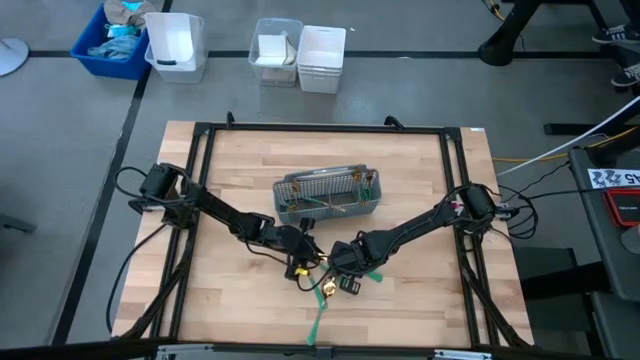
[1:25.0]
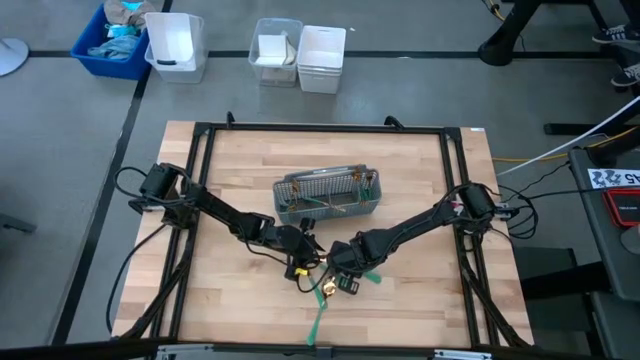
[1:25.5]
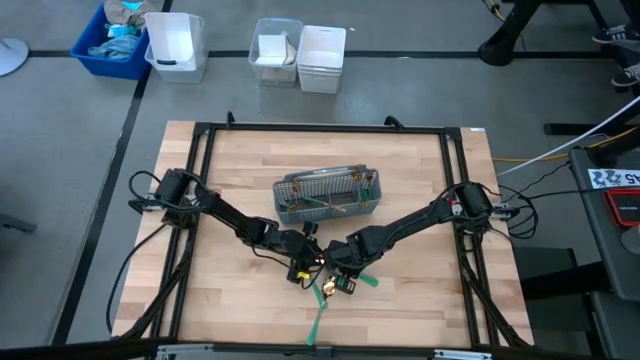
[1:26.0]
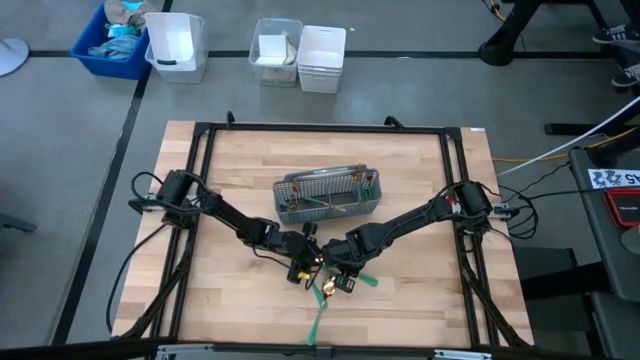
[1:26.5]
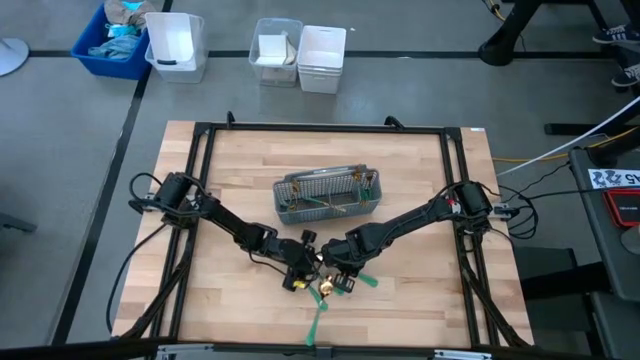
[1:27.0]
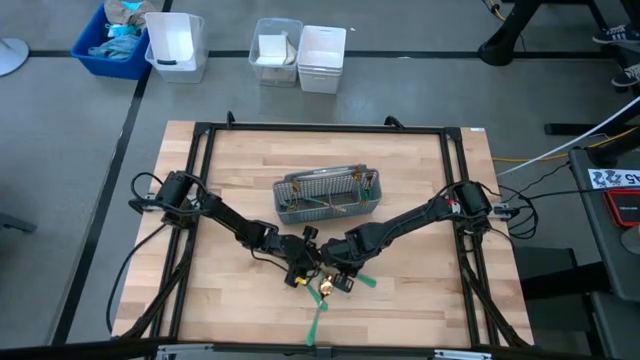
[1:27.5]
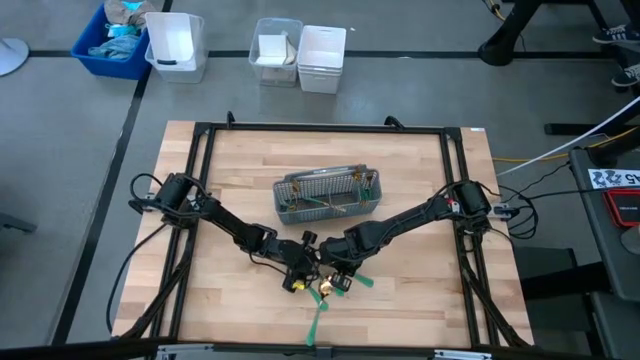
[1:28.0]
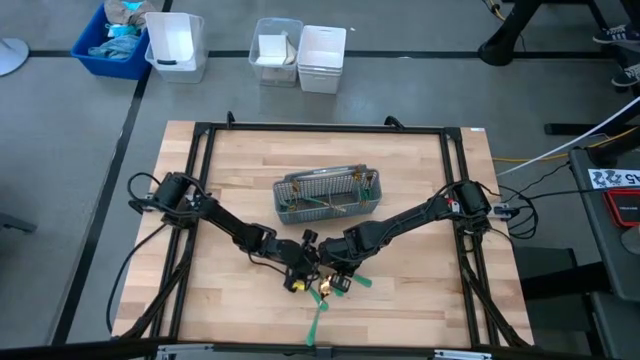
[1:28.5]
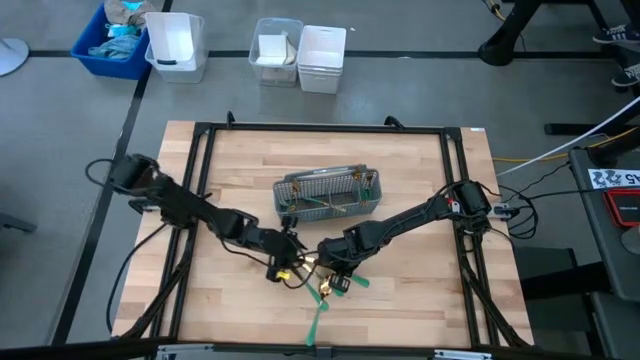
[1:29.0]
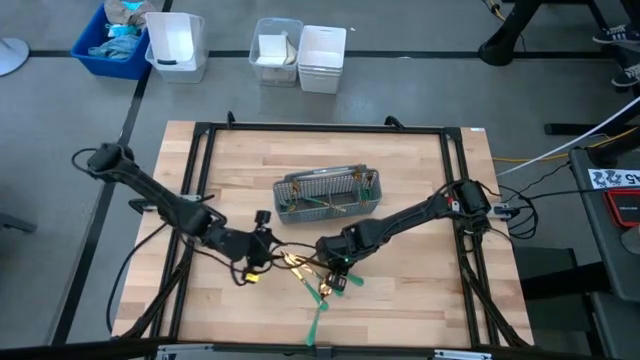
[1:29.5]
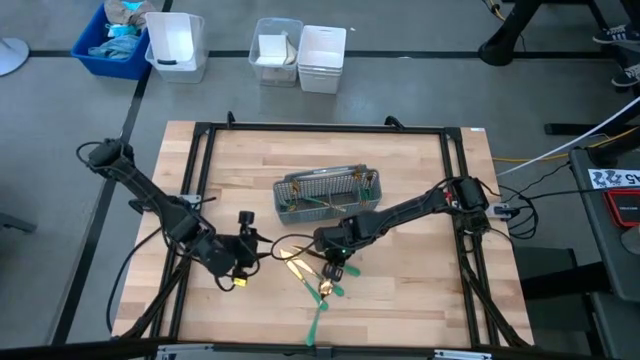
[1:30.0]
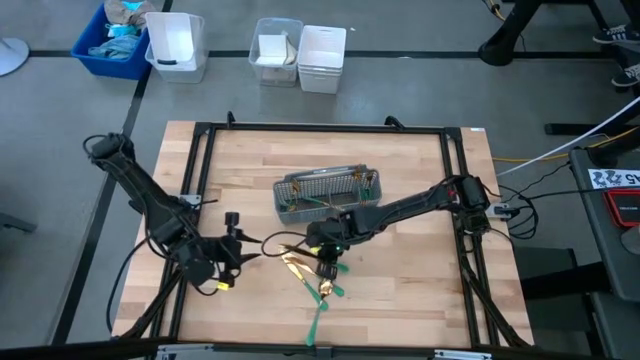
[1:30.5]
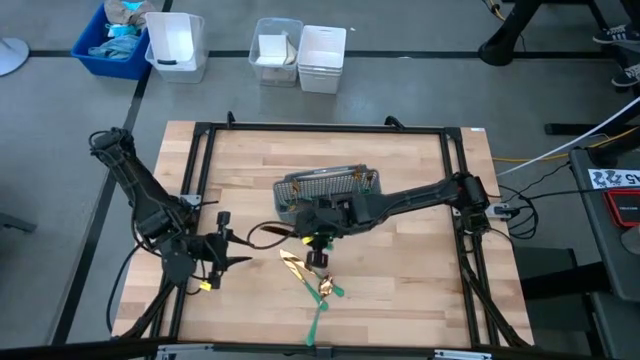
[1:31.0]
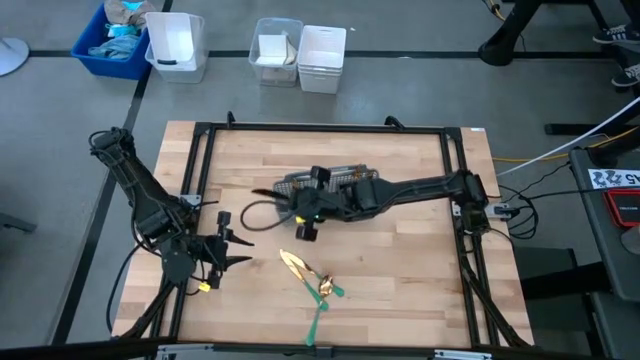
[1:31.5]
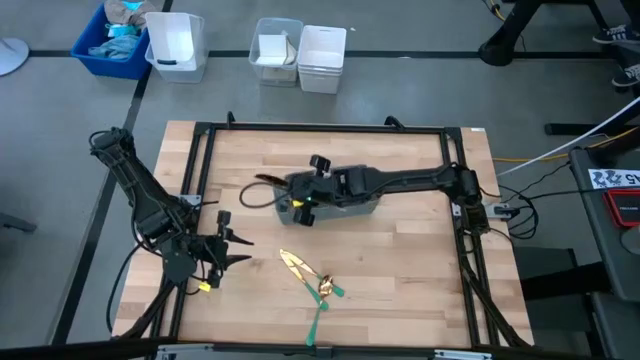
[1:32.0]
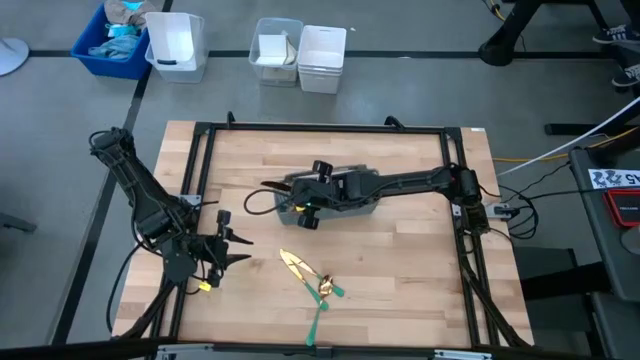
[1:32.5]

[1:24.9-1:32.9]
Task: Sort silverware
Put the green knife in the gray silverware basket

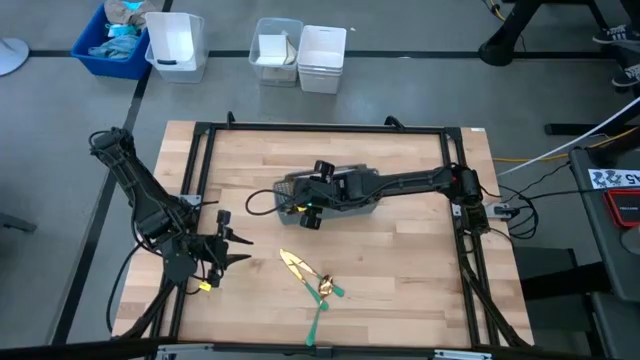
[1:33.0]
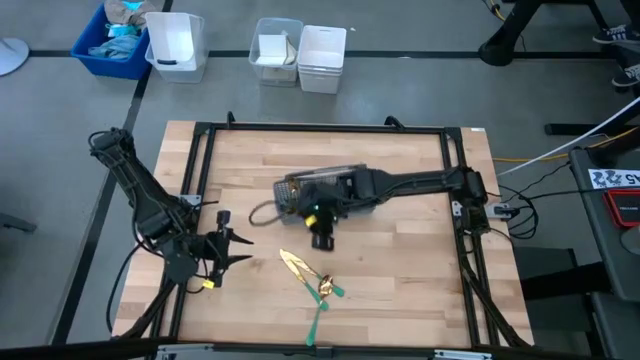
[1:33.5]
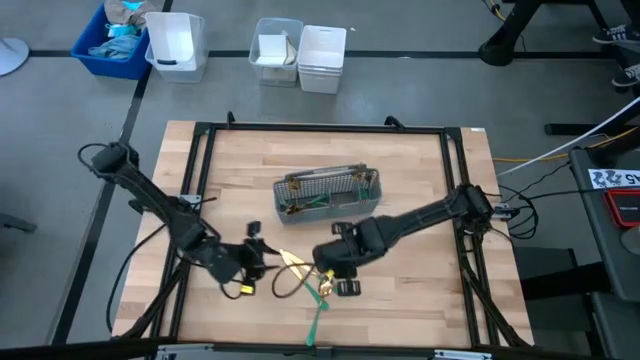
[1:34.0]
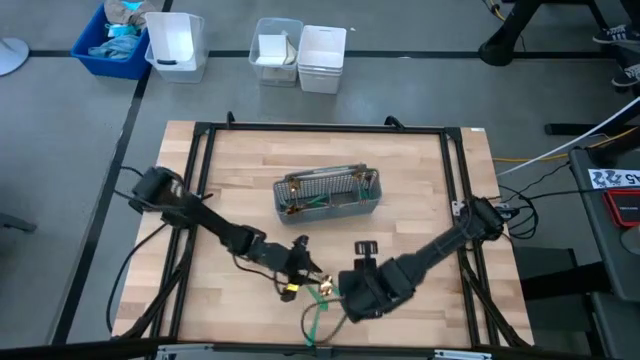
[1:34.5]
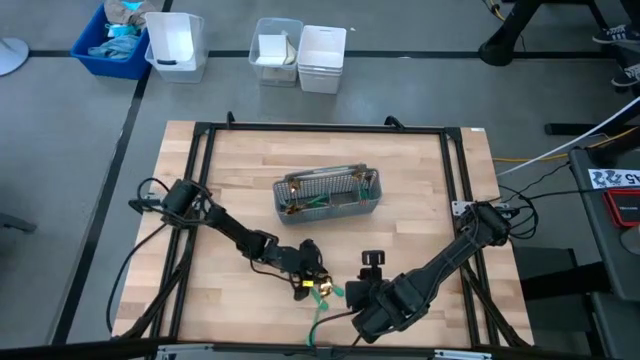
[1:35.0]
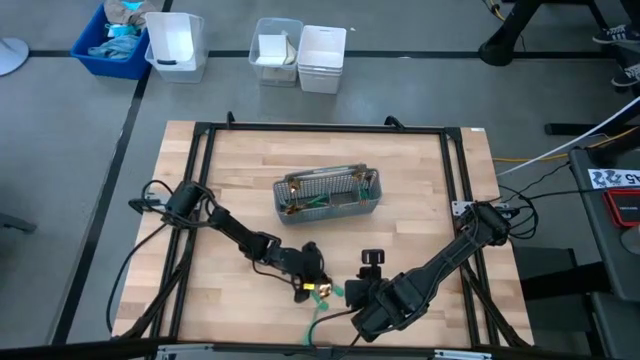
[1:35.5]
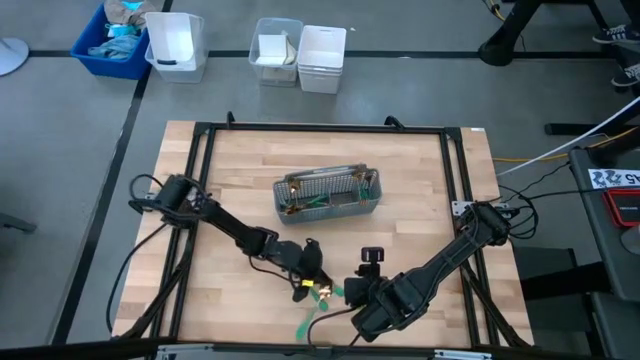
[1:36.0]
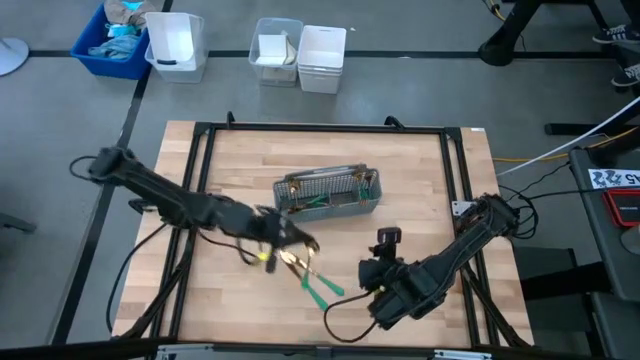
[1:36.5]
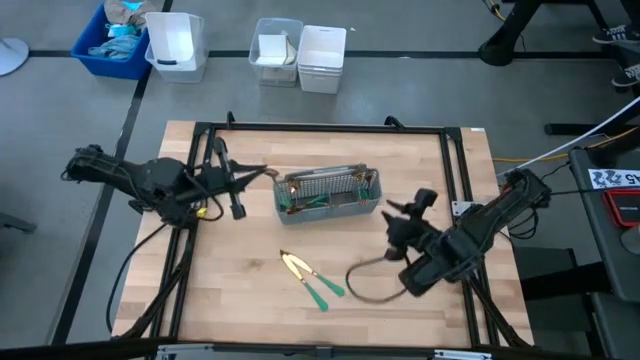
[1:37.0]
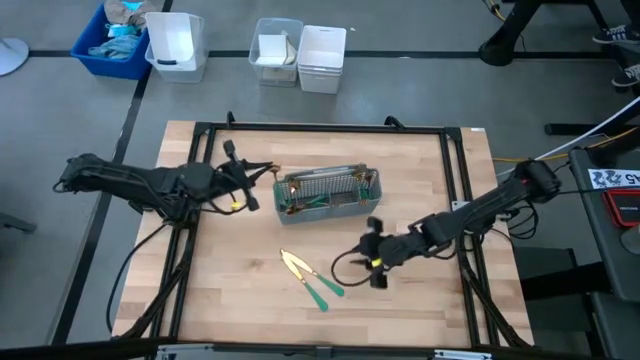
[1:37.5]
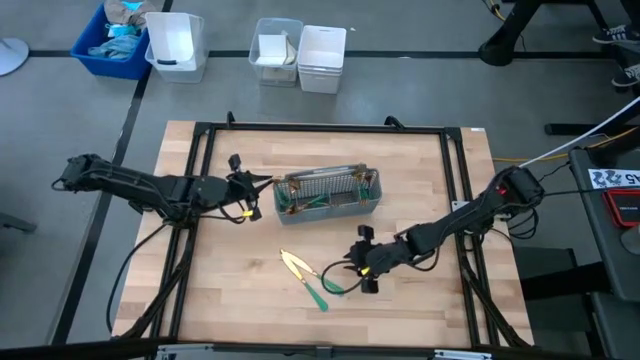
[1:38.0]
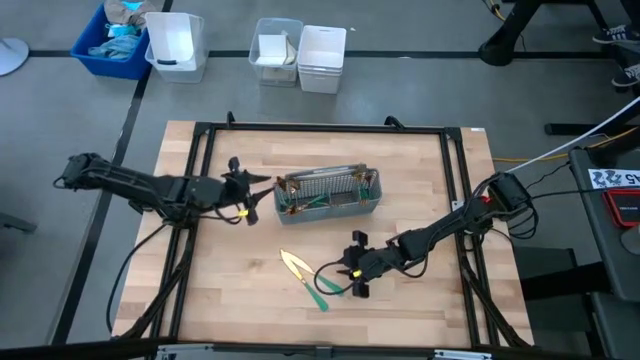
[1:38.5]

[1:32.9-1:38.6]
Put the green spoon in the gray silverware basket

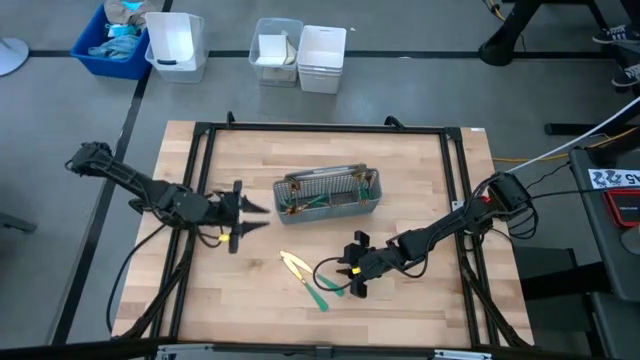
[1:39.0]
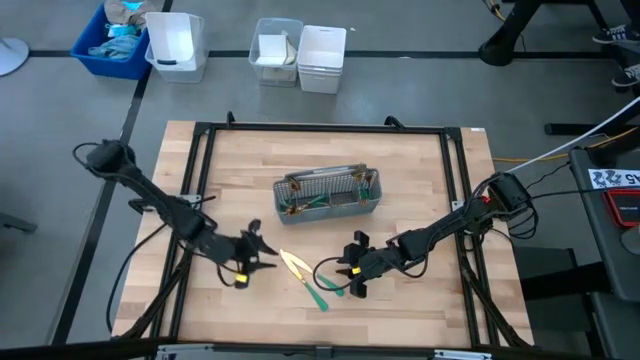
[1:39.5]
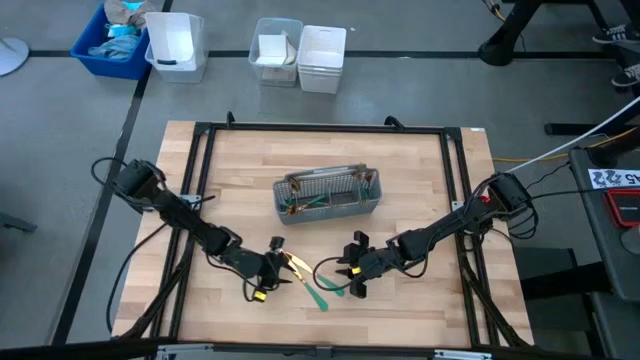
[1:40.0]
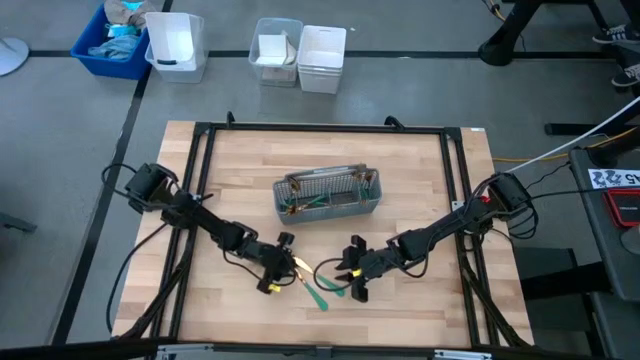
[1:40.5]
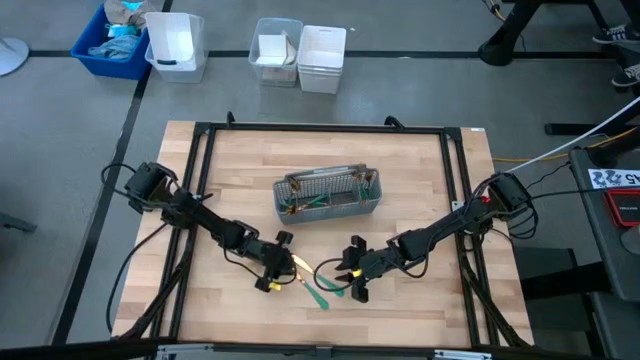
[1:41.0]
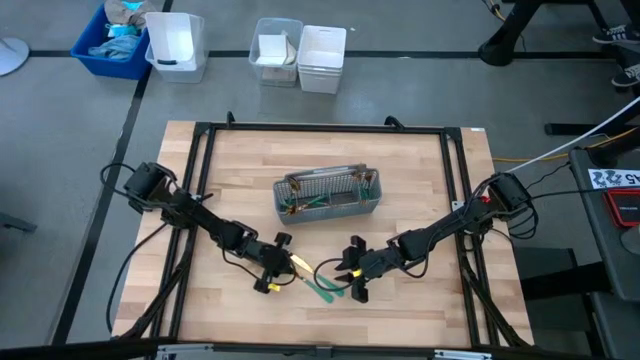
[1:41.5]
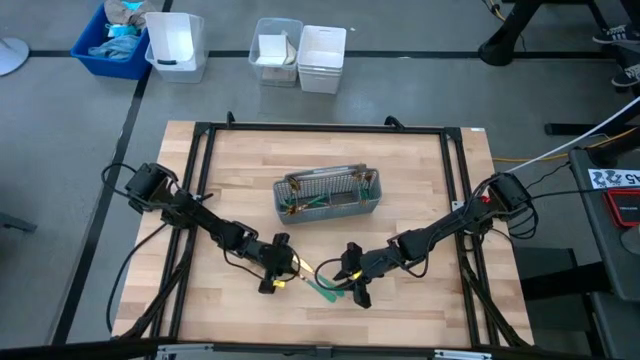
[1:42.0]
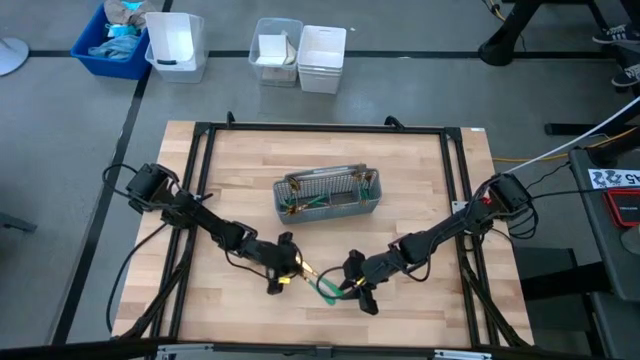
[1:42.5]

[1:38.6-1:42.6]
Put the green knife in the gray silverware basket

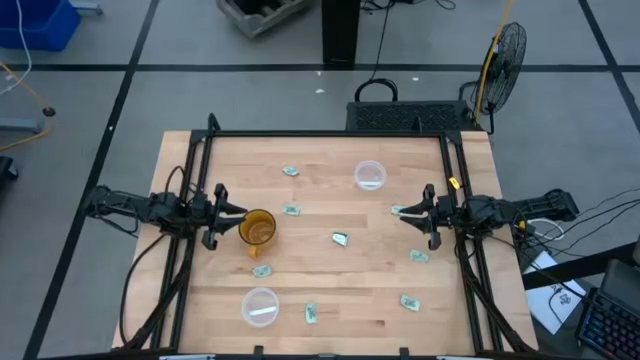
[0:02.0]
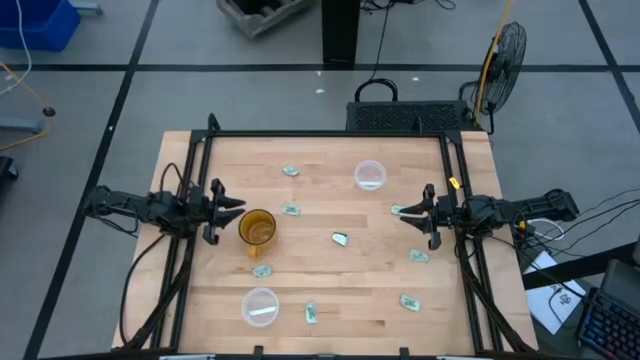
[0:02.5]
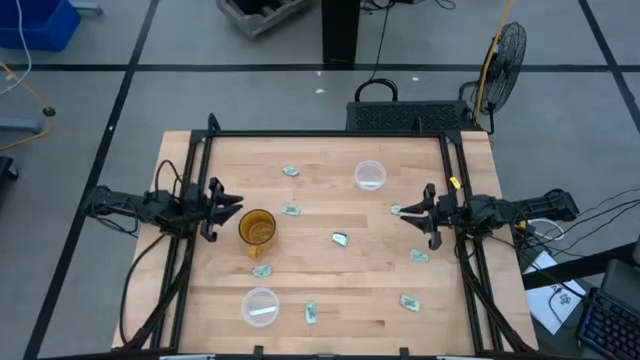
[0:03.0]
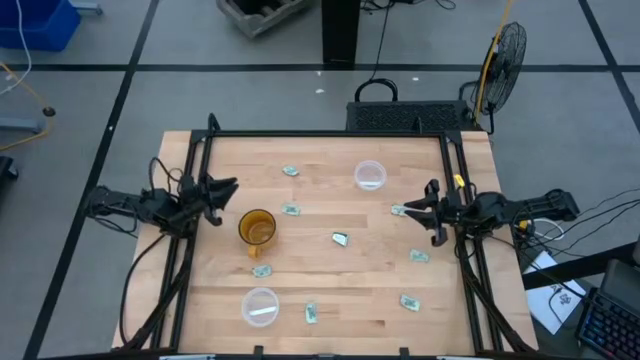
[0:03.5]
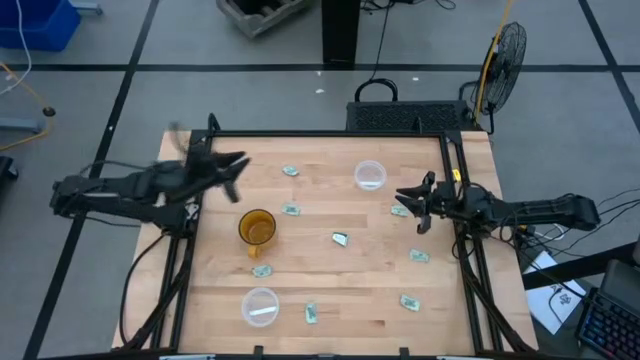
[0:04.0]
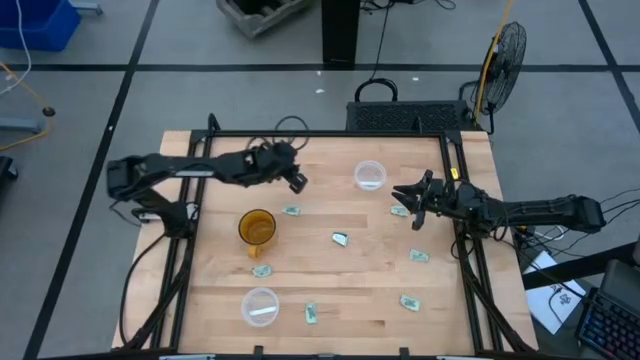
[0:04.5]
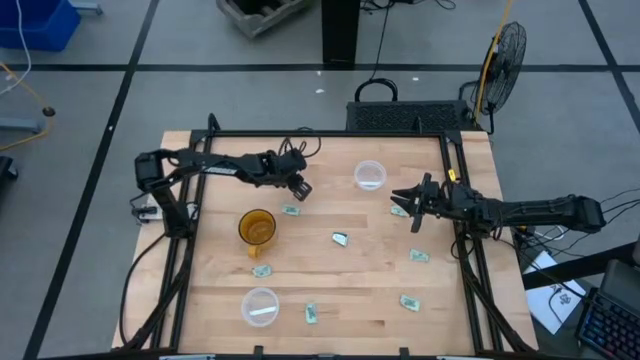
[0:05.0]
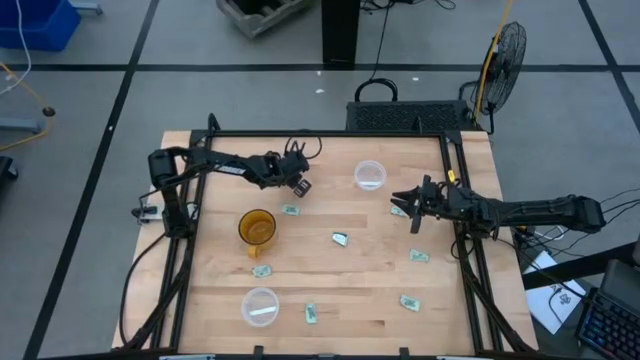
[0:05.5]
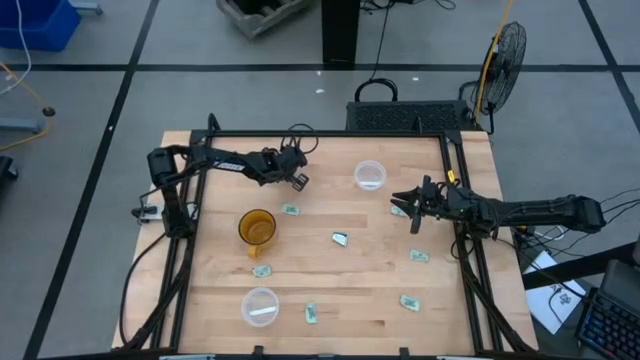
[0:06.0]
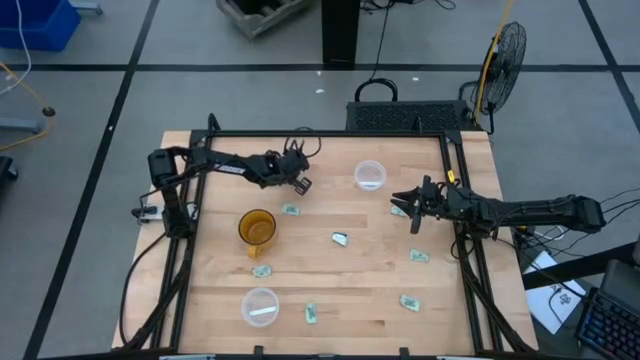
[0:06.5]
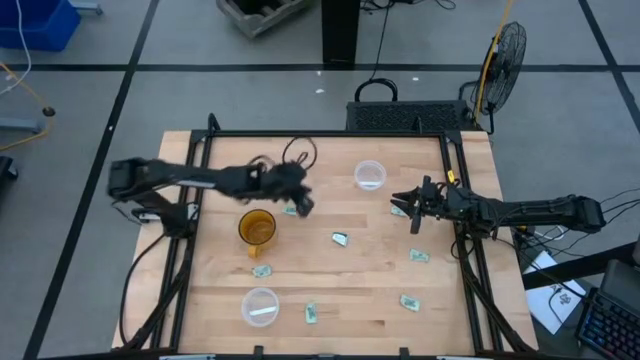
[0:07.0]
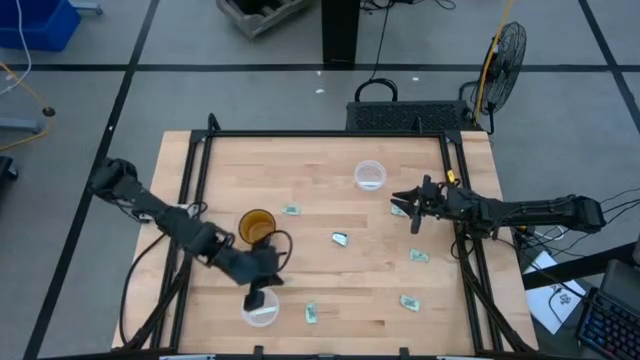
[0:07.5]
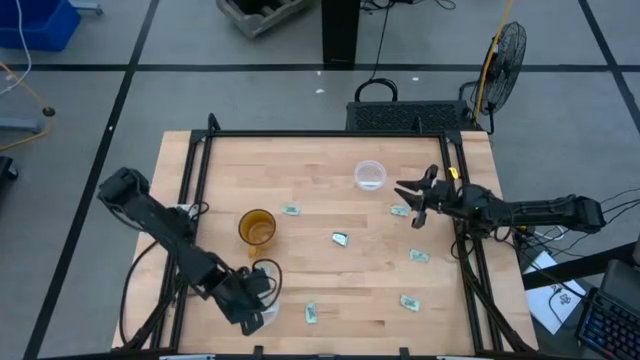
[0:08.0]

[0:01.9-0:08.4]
Task: Pick and place items into bin
Put the green stevia packet into the bottom transparent bin
